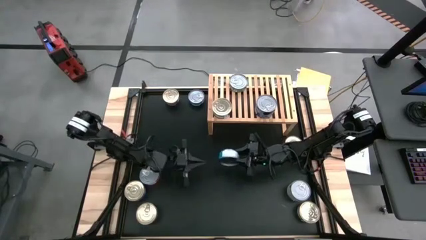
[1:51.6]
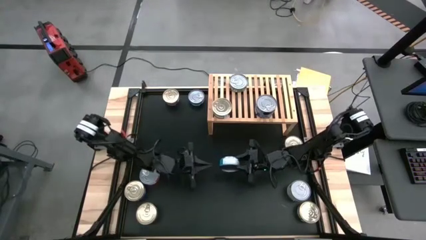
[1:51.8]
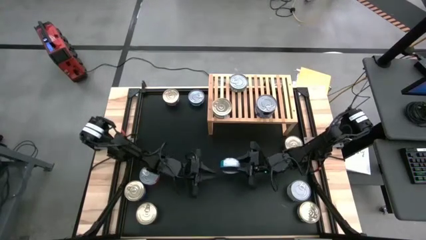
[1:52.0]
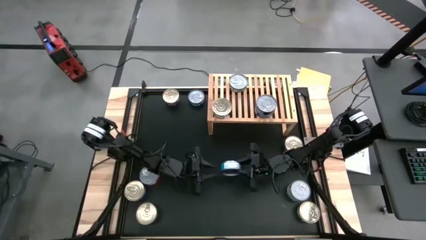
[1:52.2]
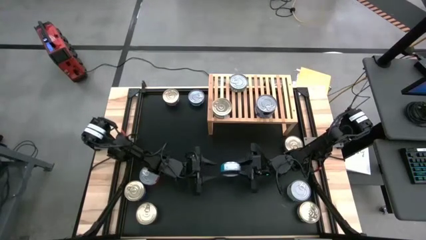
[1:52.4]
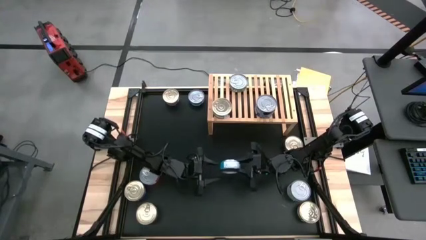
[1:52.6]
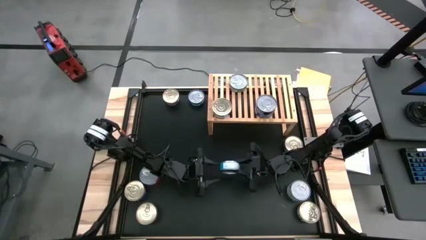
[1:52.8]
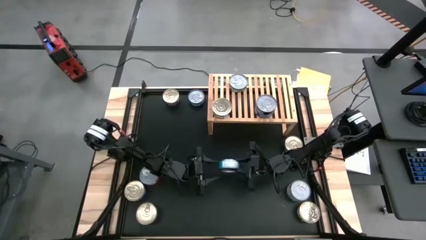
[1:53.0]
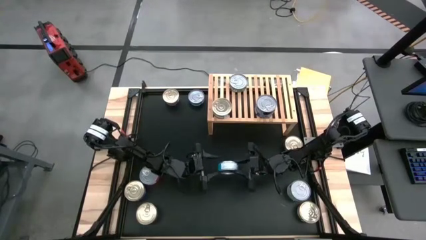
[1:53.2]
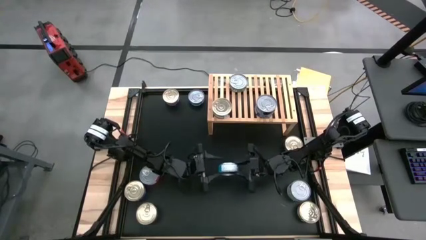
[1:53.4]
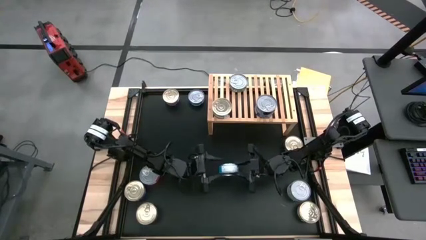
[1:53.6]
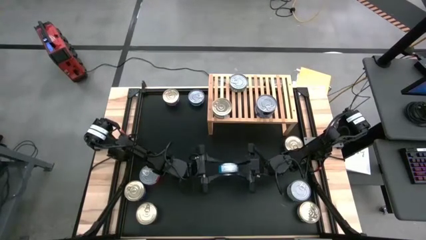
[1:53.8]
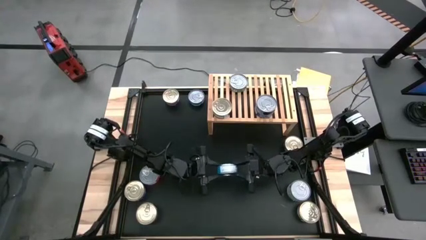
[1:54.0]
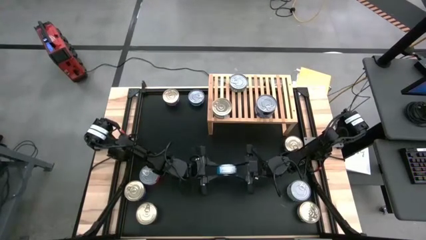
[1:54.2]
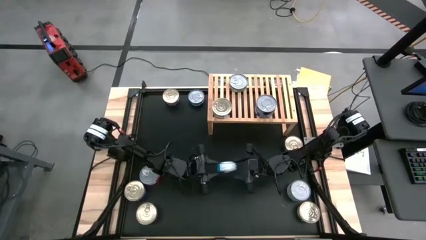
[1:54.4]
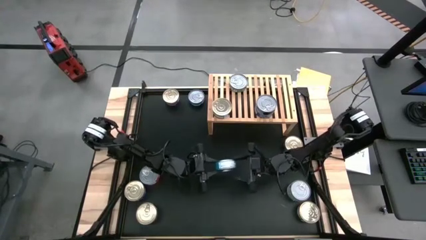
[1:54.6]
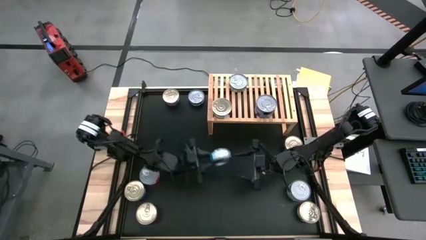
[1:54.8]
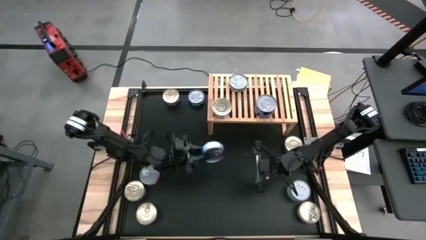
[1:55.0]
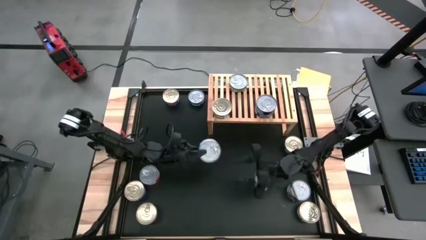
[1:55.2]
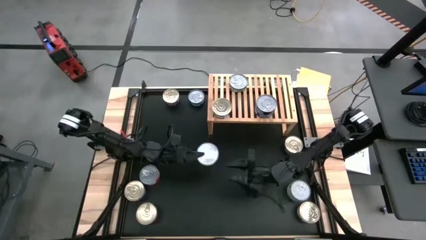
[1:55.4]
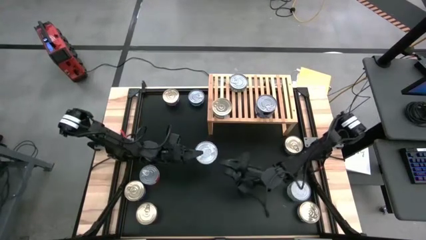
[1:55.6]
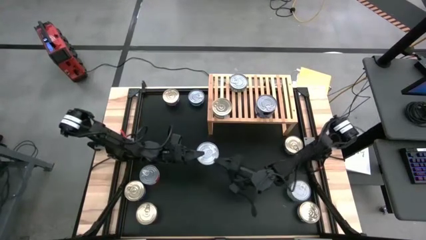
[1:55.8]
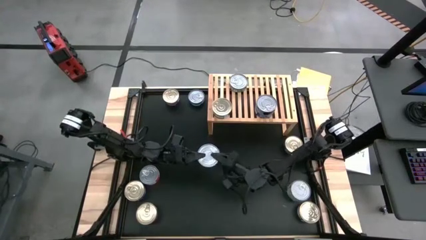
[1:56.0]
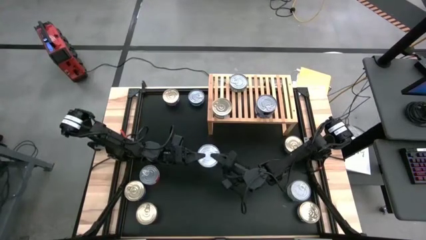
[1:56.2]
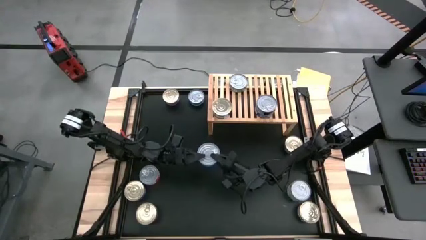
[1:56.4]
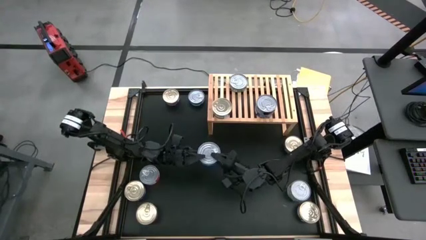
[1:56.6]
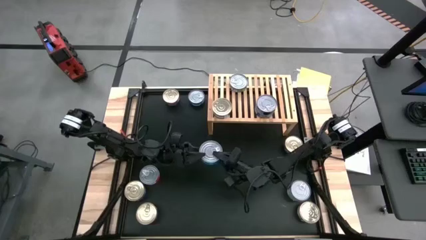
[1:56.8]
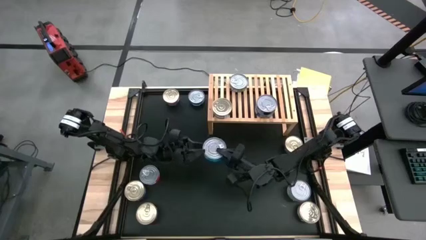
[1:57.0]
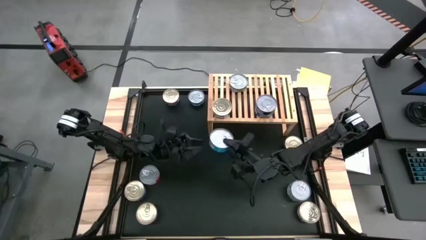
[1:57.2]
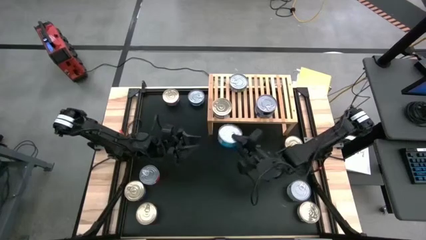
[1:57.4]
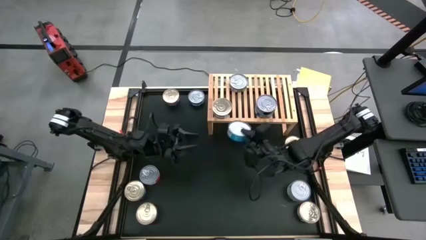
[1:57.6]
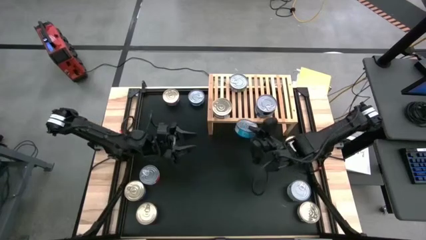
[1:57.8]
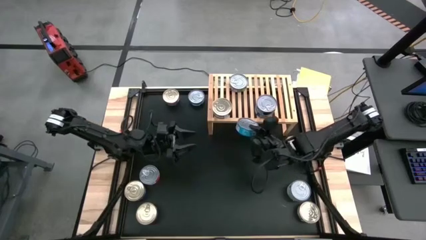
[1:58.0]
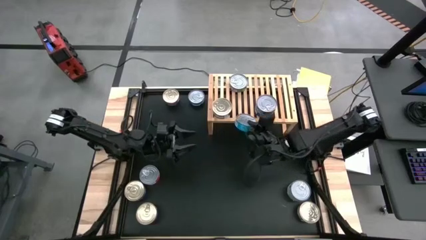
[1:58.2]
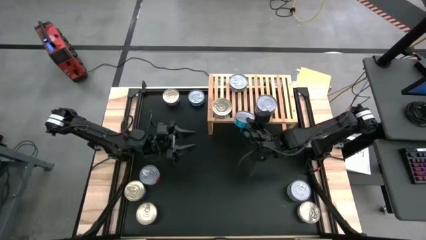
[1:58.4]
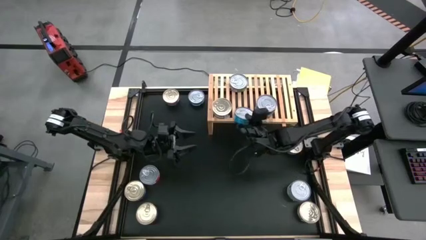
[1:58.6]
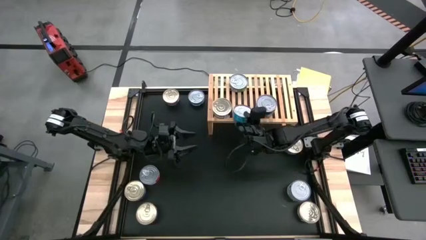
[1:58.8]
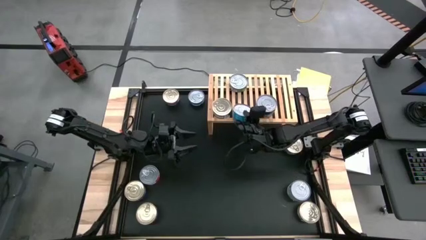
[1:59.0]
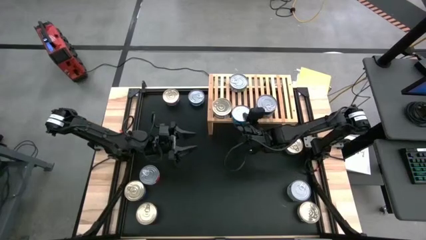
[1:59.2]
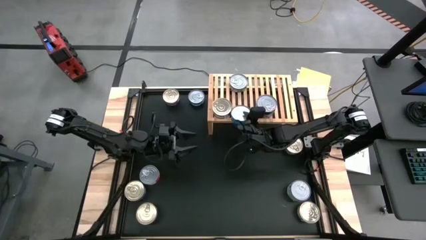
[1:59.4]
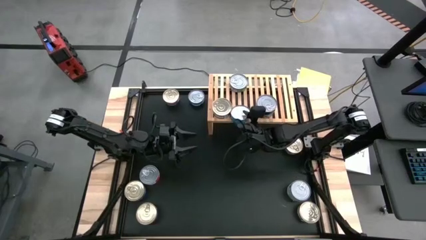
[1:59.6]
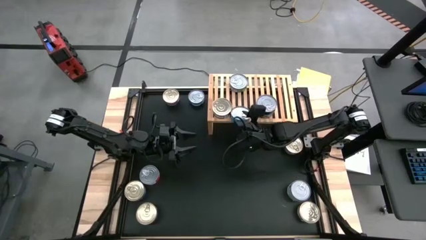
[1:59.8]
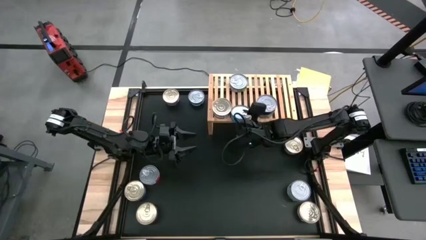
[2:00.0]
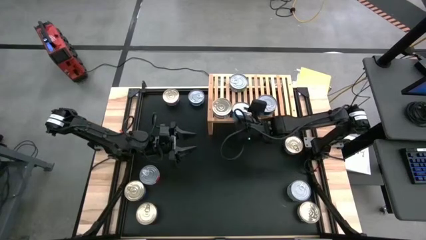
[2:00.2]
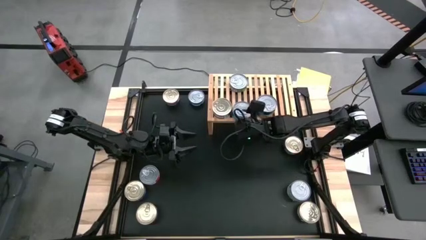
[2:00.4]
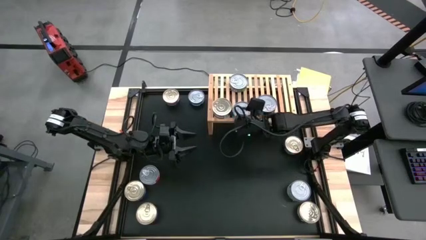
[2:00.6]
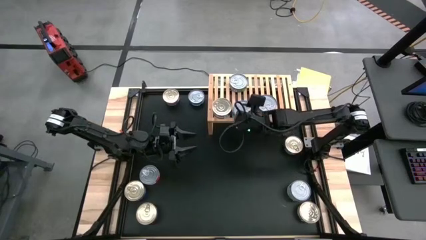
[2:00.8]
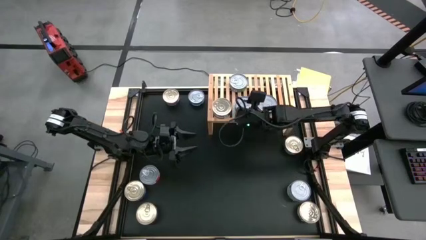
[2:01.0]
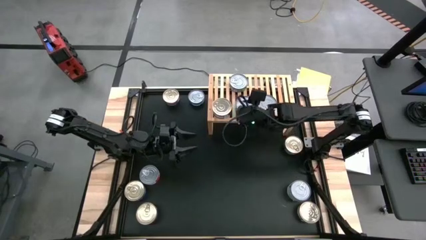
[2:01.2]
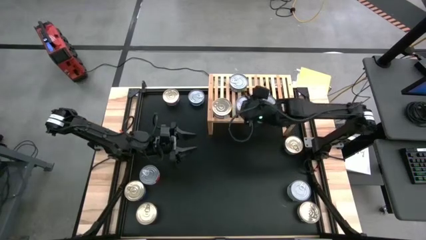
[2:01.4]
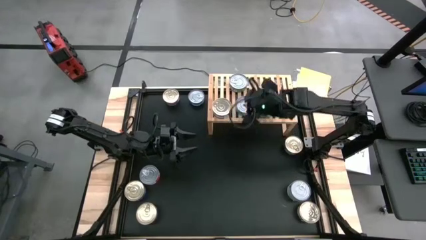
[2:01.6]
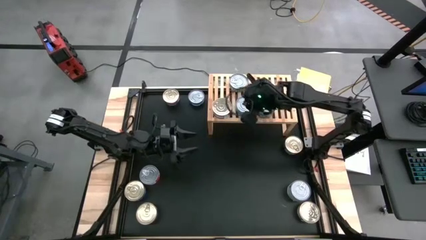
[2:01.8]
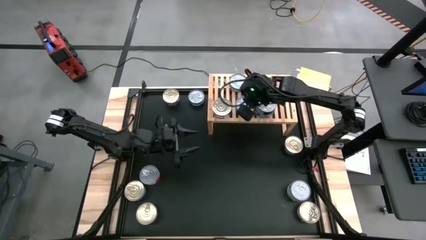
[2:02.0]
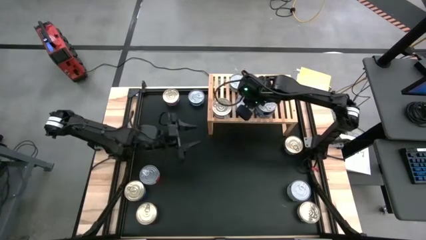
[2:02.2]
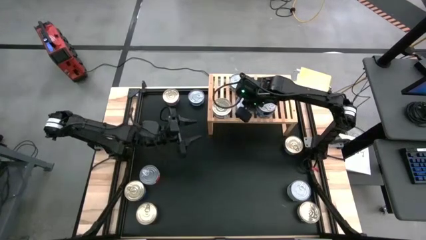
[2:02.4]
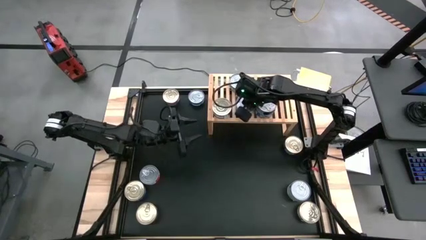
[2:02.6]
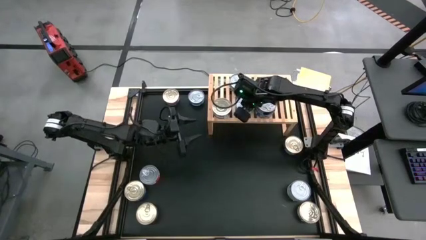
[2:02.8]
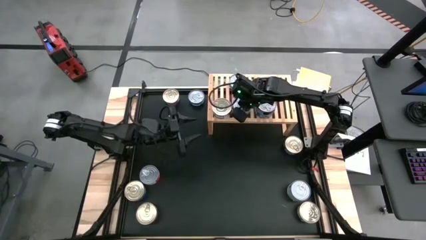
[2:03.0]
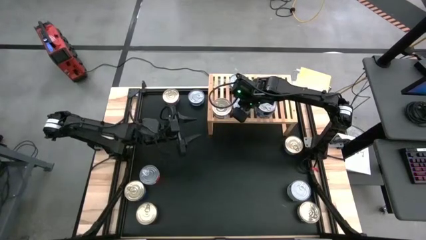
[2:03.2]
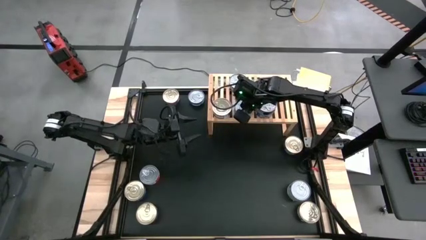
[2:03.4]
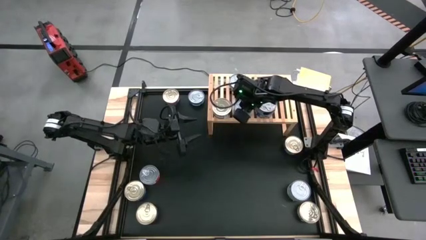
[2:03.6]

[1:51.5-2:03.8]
Task: Stack canned seafood by type on shelf
Put the yellow-blue tuna can on the shelf
